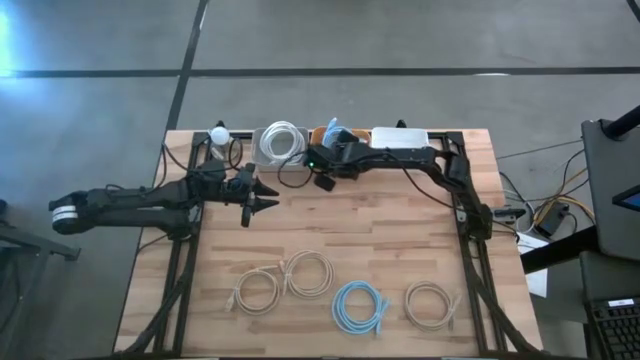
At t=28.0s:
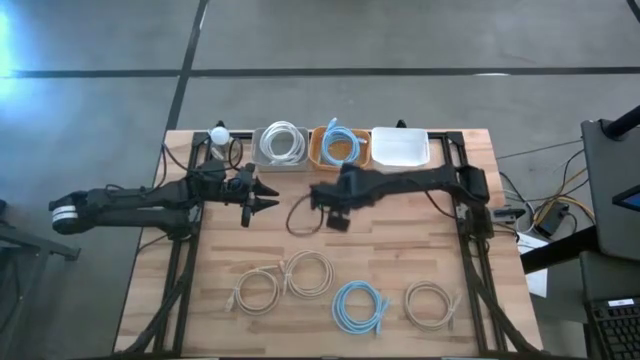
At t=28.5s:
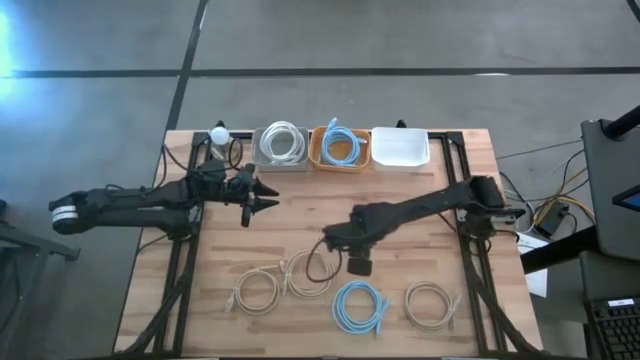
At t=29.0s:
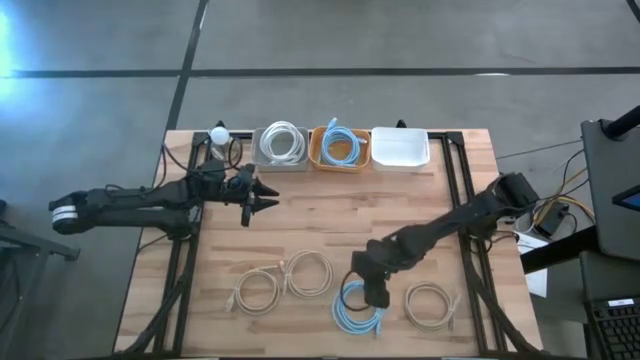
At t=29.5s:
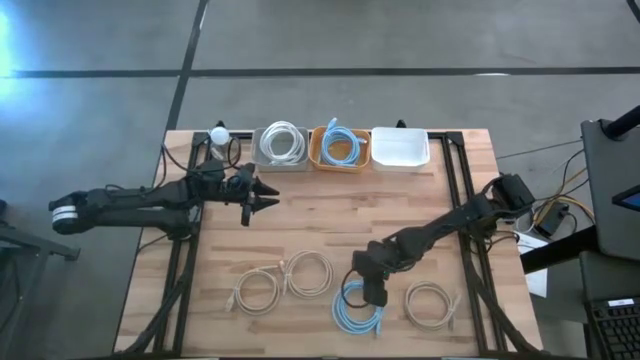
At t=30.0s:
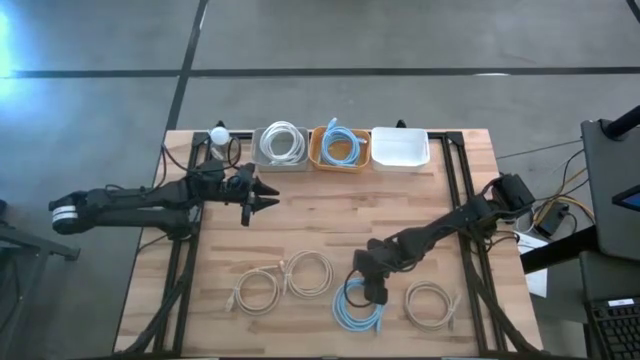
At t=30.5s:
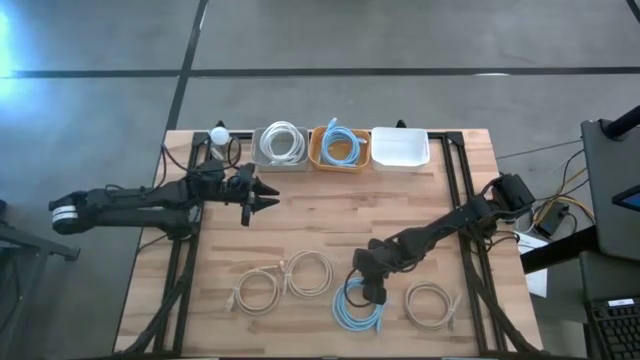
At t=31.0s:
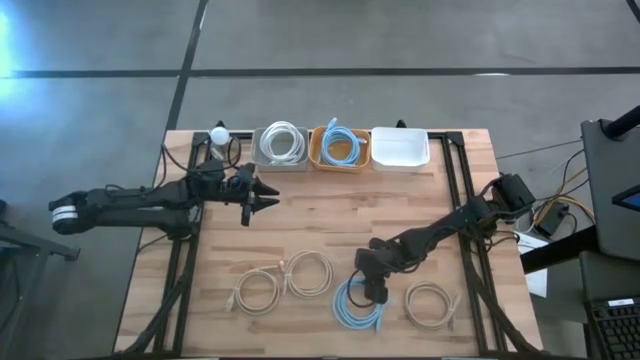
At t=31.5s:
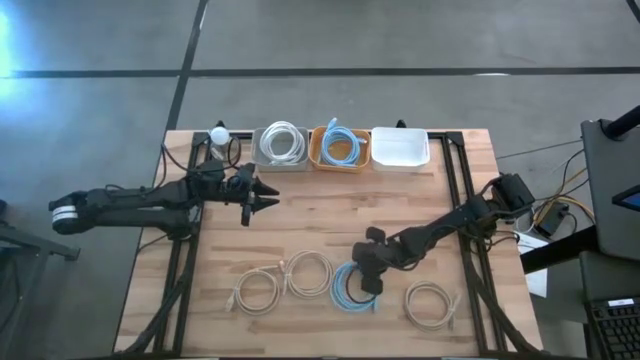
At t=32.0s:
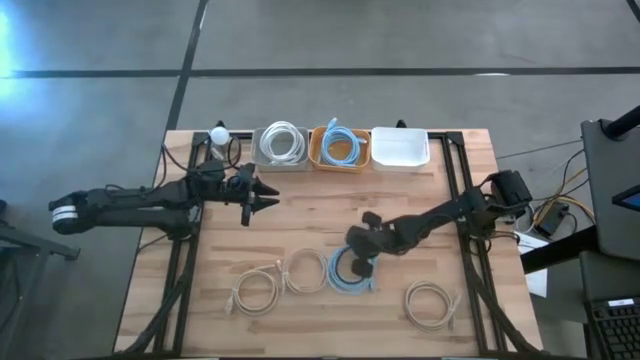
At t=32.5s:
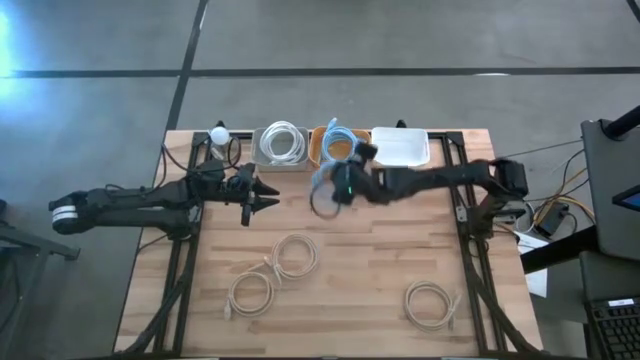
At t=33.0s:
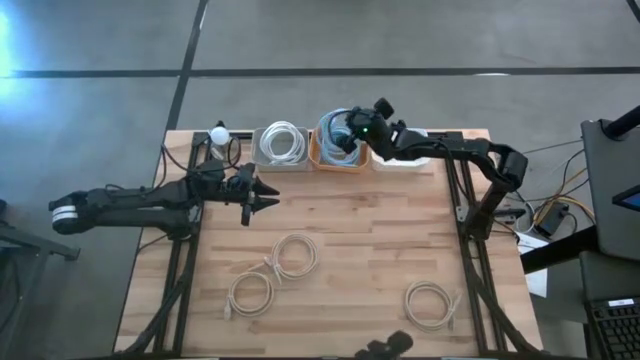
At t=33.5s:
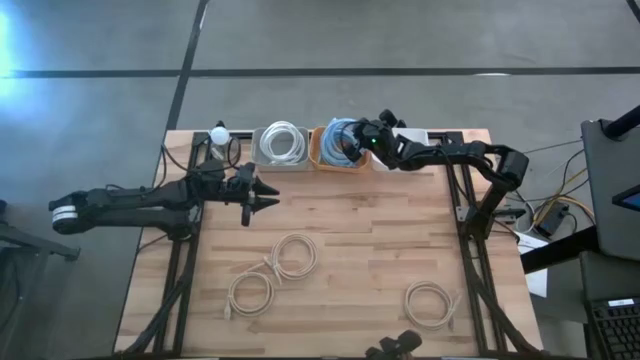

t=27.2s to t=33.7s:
Task: Pick & Place USB Port
Put the blue charger cable into the orange bin

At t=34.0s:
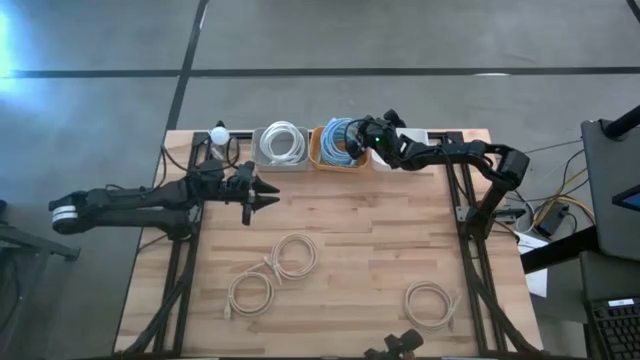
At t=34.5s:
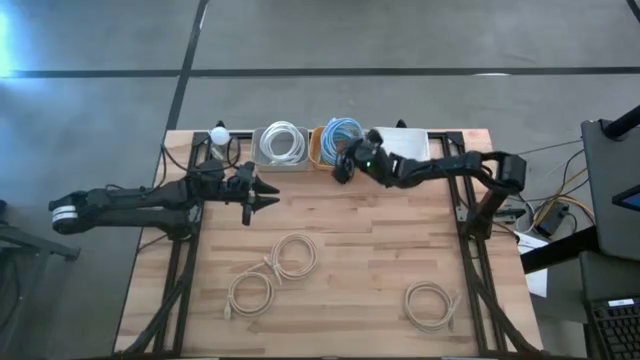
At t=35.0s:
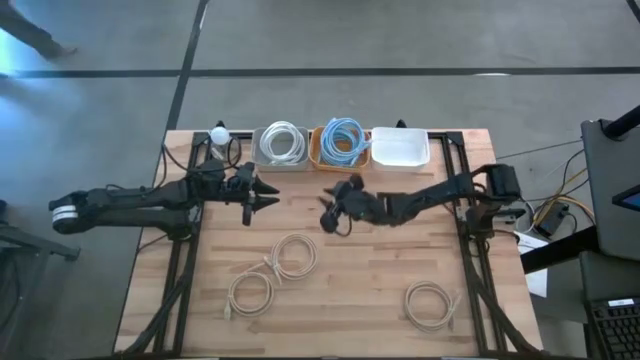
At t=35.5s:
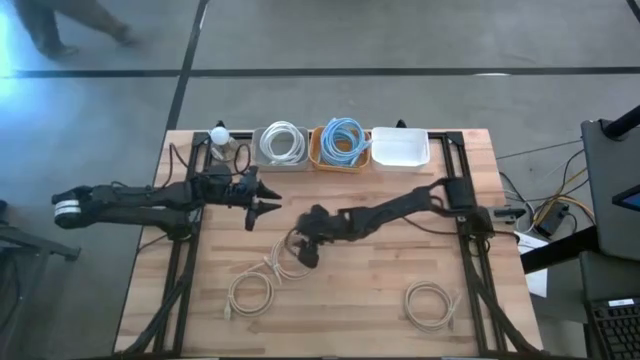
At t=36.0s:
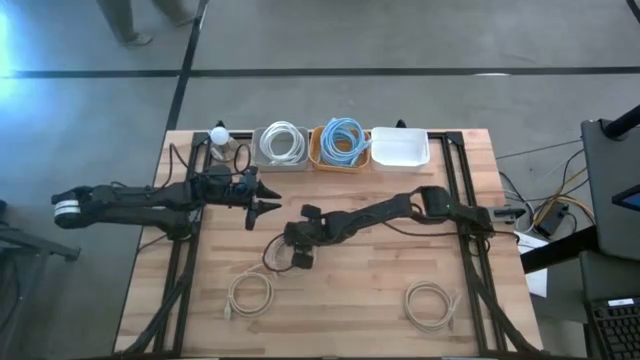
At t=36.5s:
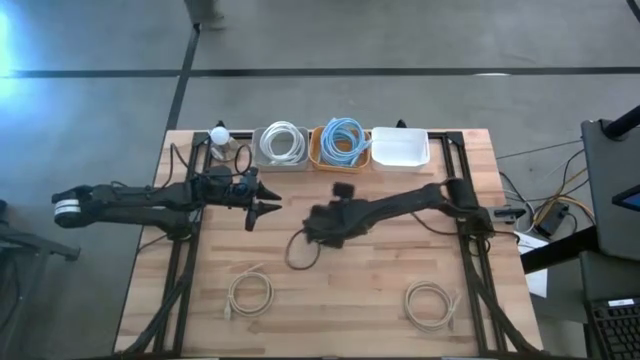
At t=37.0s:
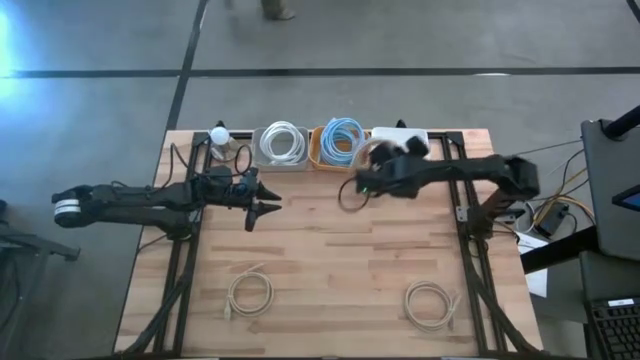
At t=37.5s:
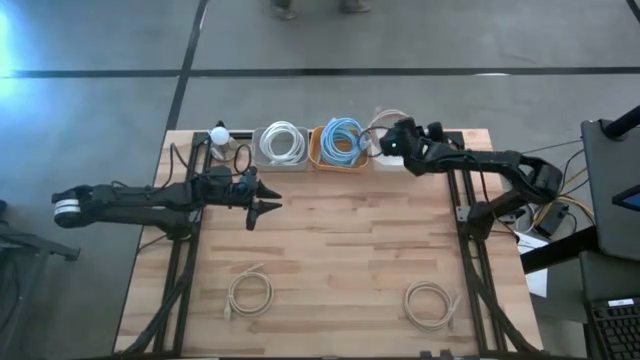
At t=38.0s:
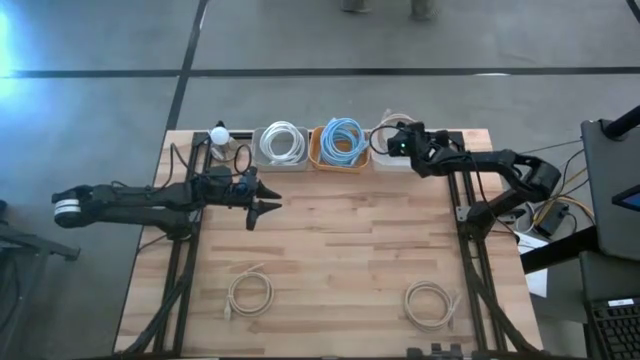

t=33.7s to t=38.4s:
Put the top light brown charger cable into the white bin

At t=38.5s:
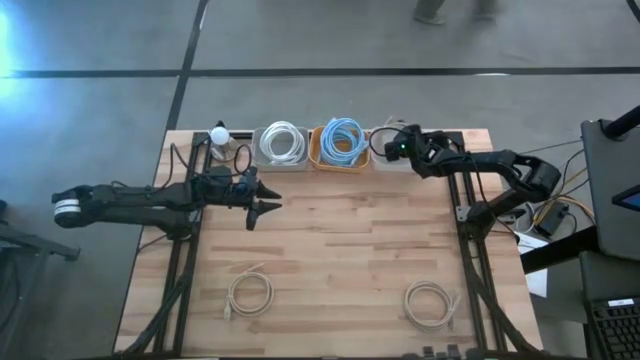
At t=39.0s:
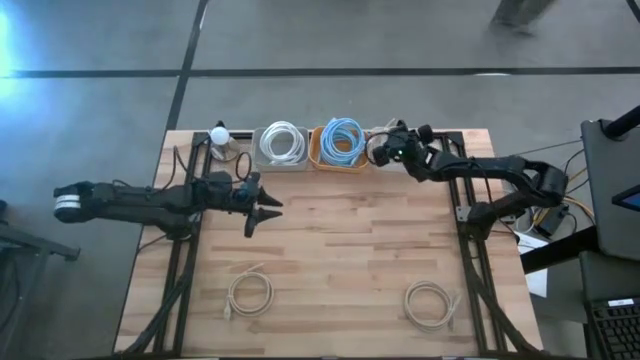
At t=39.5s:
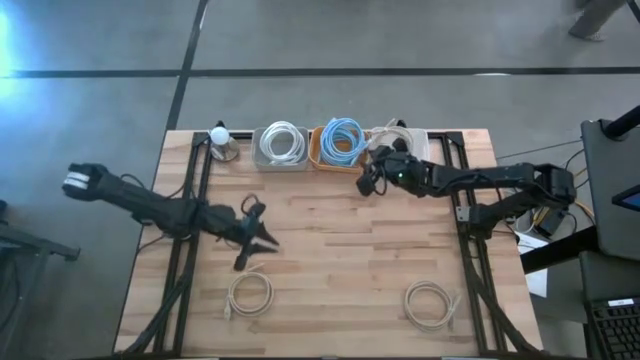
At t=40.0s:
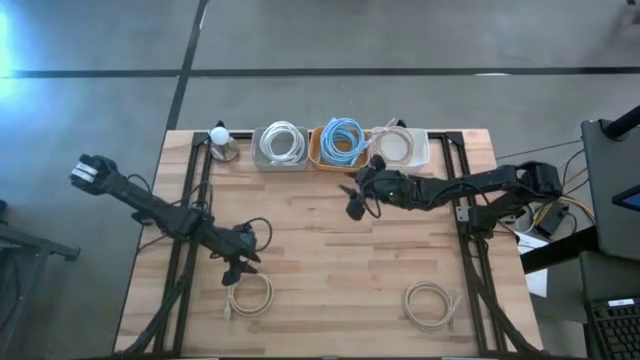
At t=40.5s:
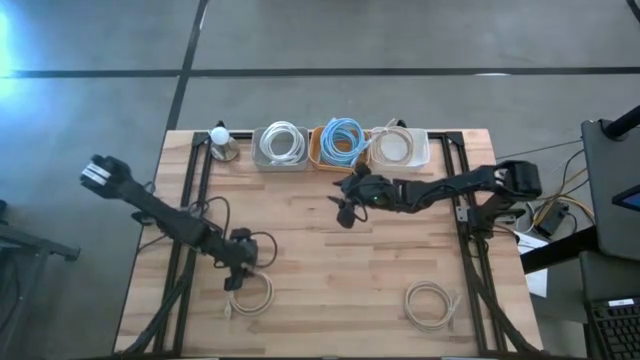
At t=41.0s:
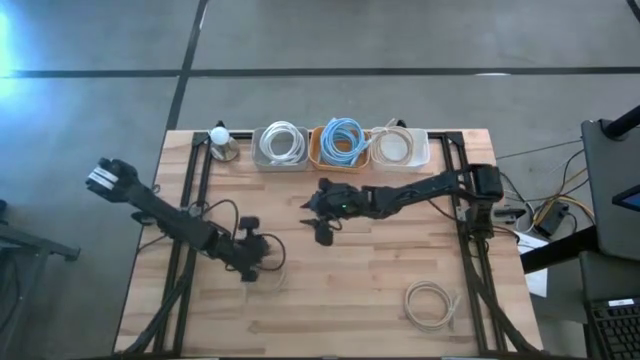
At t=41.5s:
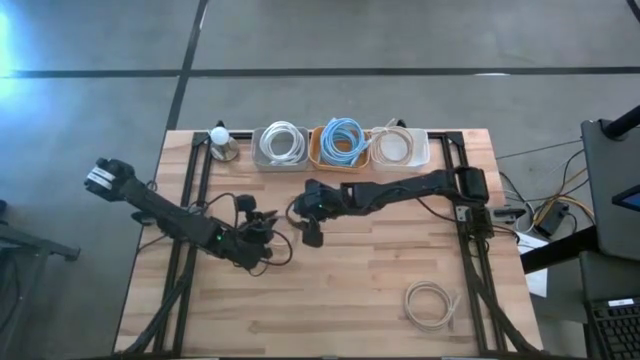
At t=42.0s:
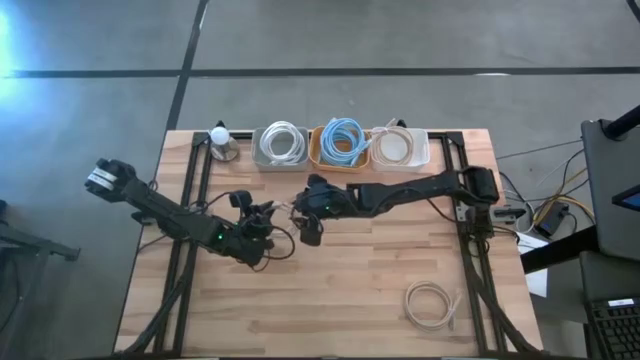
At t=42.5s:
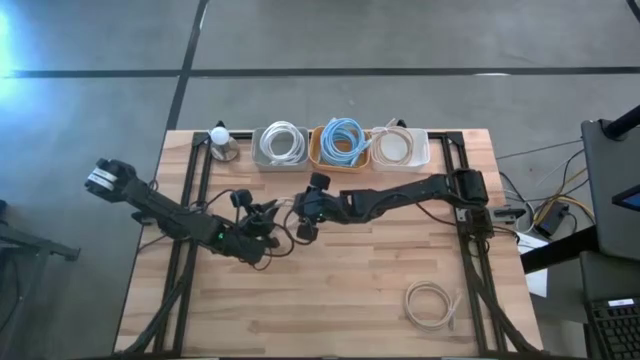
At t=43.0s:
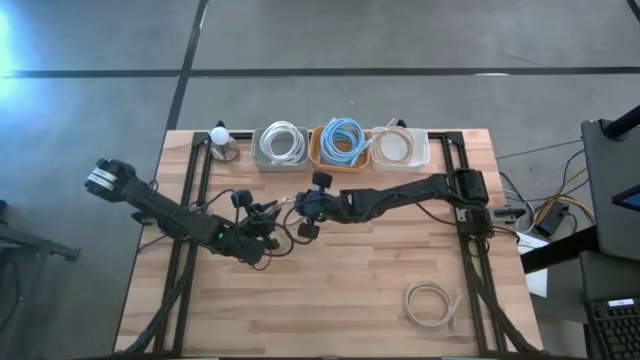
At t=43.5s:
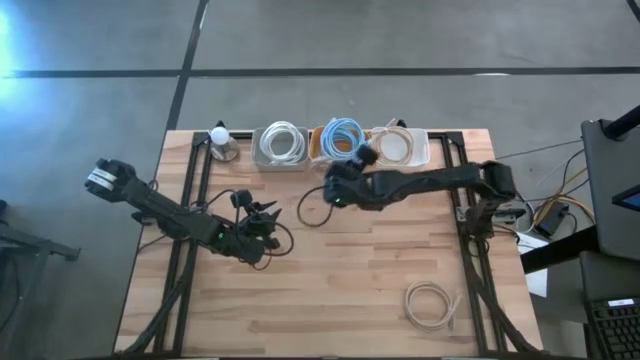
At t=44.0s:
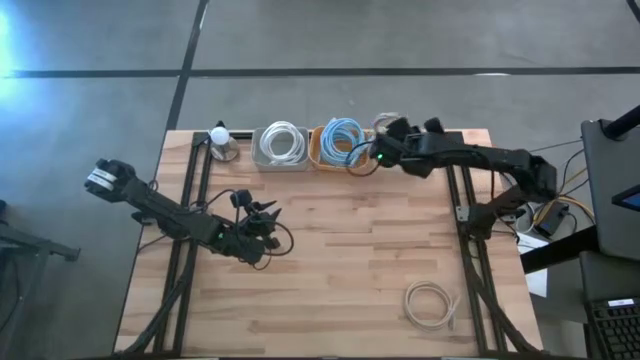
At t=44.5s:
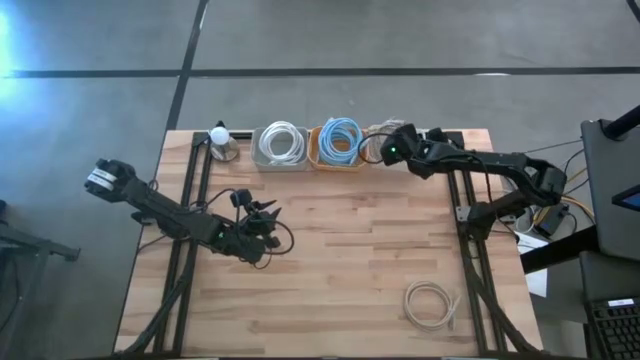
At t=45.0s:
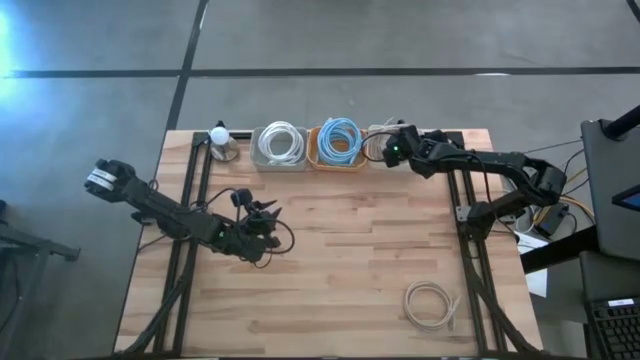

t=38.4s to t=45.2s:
Put the left light brown charger cable into the white bin

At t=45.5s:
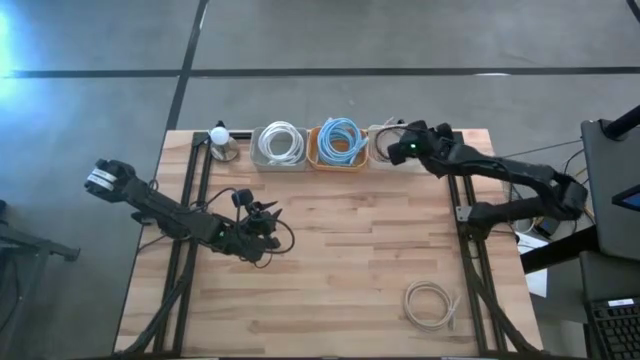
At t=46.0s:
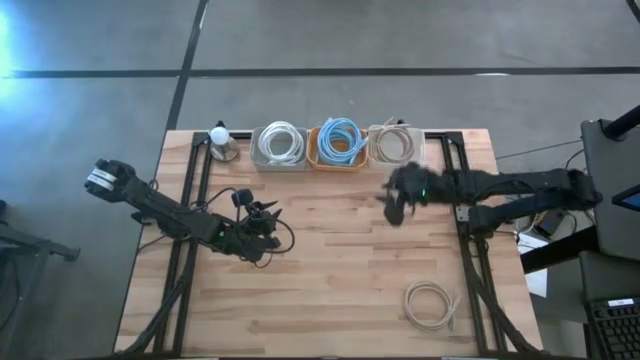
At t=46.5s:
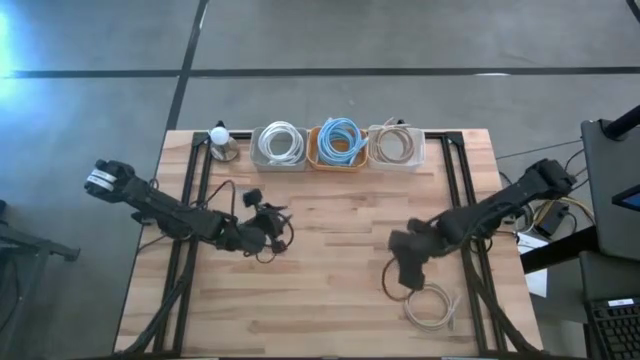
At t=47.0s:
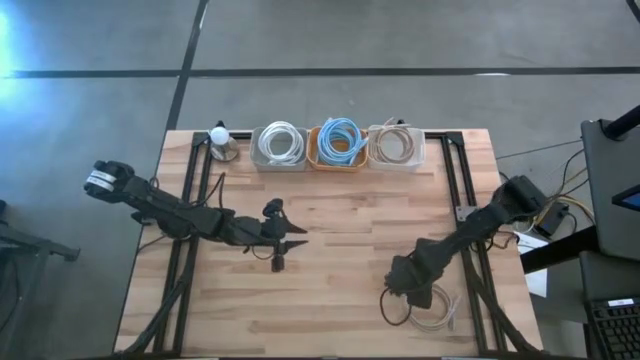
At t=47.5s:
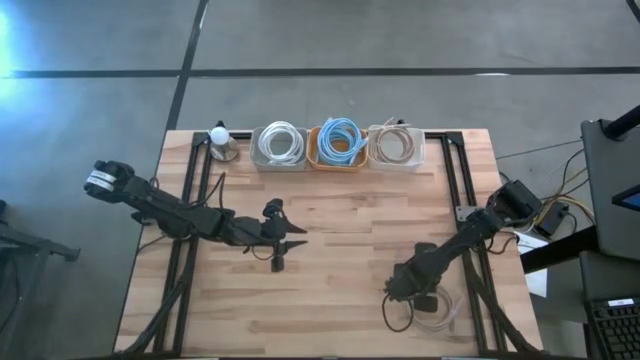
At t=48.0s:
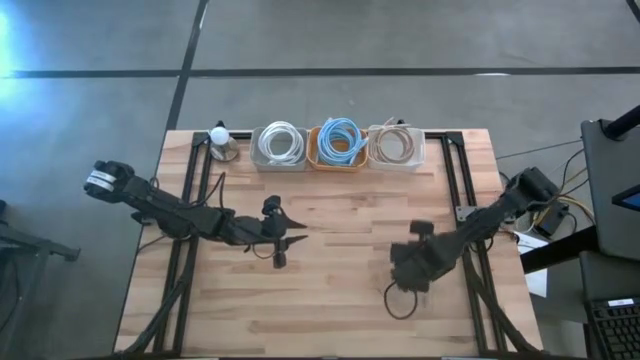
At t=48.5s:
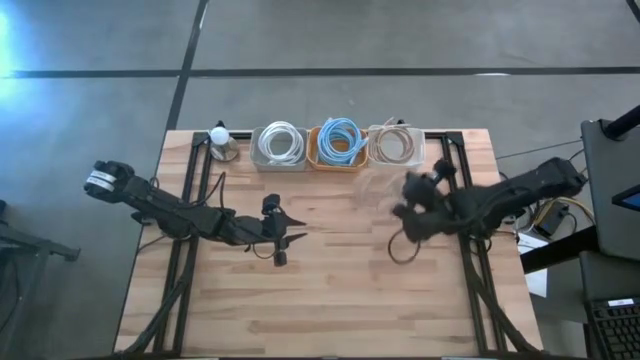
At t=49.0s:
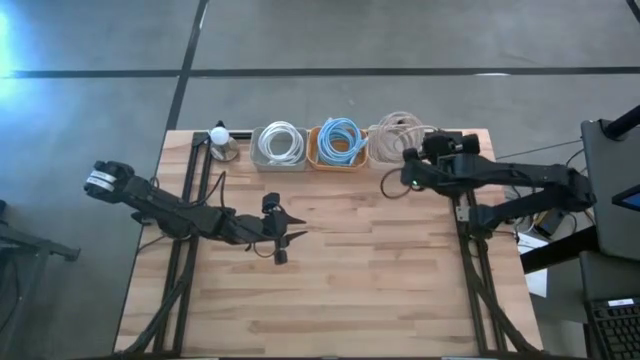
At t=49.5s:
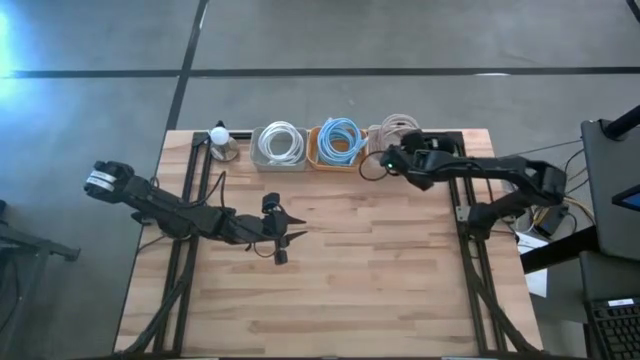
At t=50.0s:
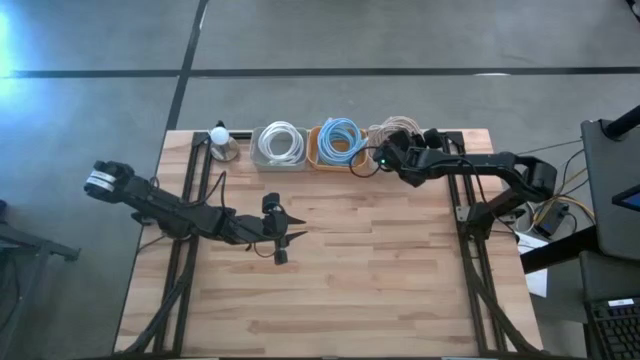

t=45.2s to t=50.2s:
Put the light brown charger cable into the white bin
